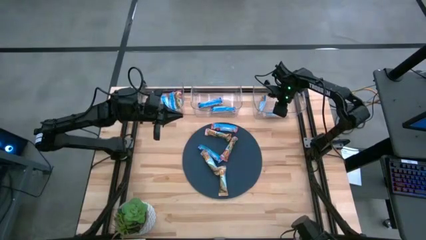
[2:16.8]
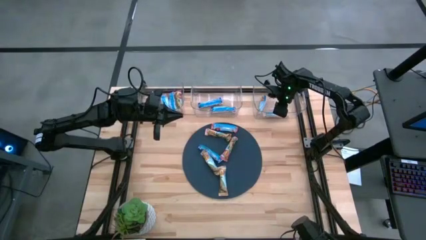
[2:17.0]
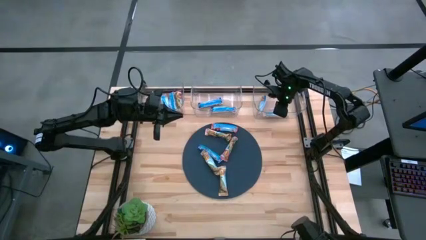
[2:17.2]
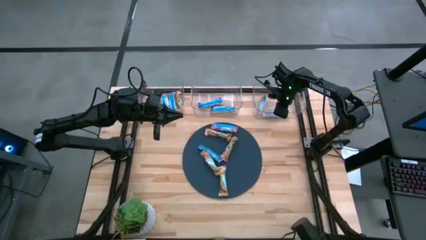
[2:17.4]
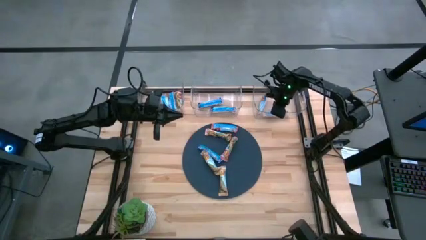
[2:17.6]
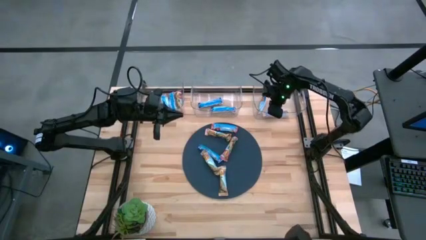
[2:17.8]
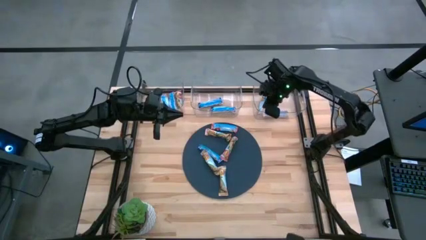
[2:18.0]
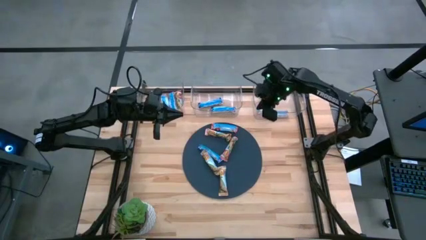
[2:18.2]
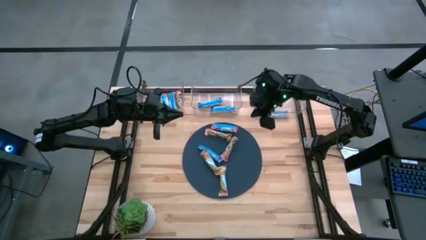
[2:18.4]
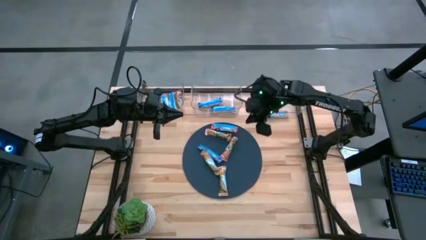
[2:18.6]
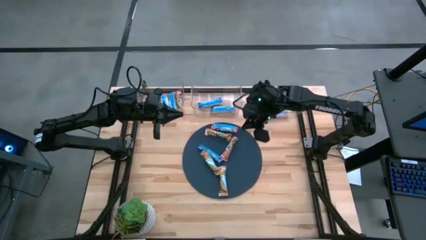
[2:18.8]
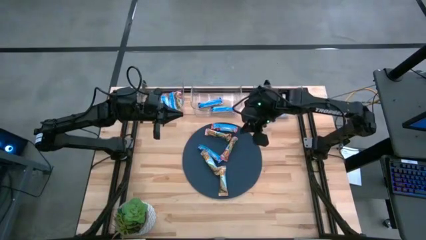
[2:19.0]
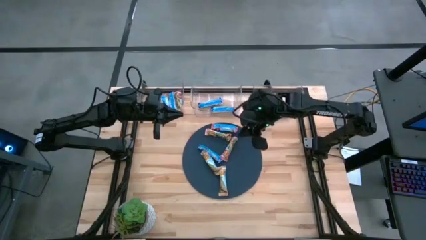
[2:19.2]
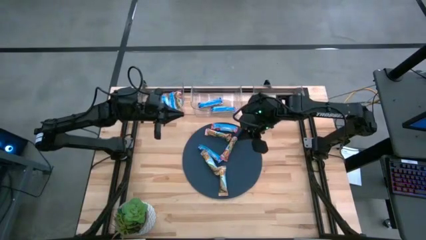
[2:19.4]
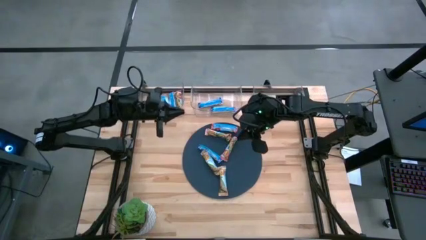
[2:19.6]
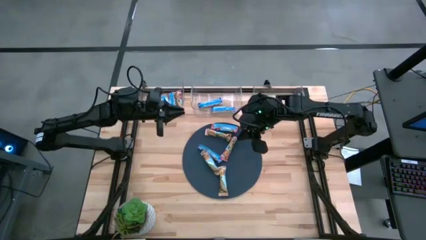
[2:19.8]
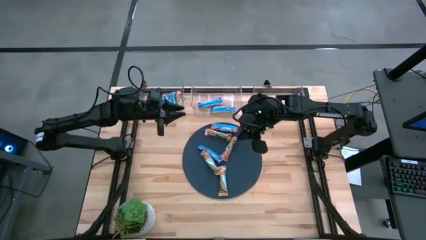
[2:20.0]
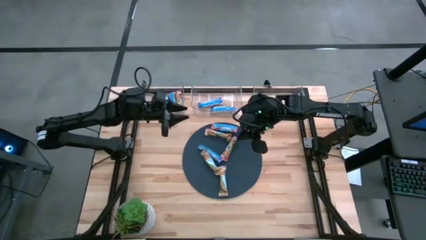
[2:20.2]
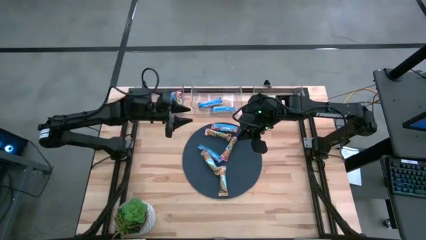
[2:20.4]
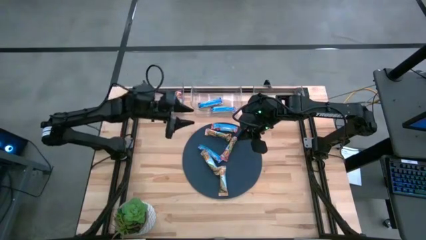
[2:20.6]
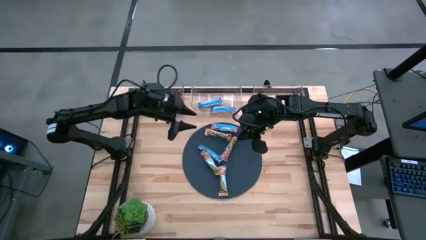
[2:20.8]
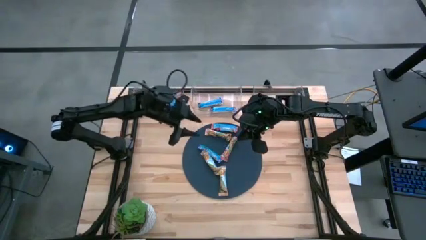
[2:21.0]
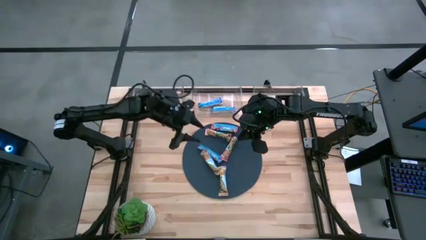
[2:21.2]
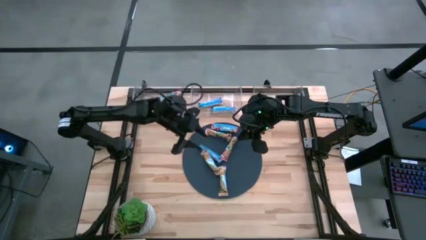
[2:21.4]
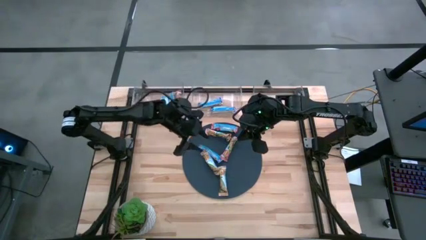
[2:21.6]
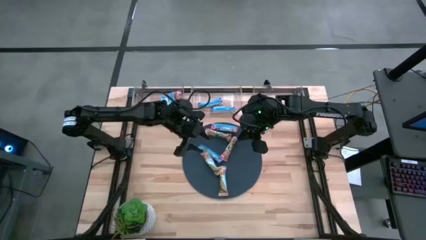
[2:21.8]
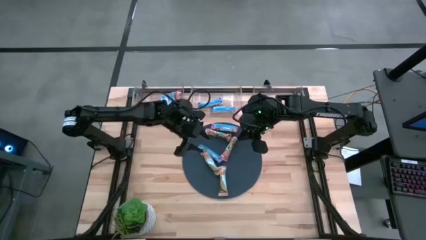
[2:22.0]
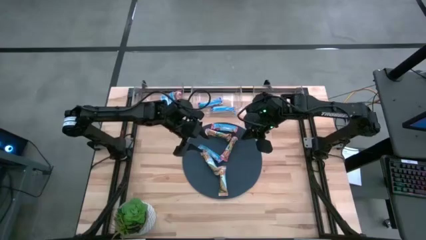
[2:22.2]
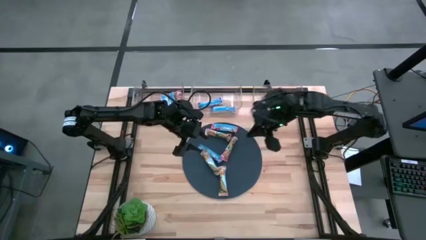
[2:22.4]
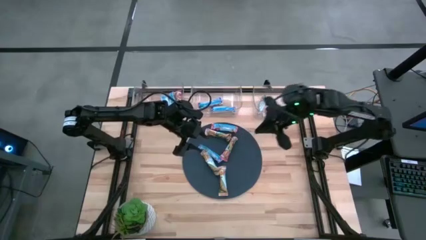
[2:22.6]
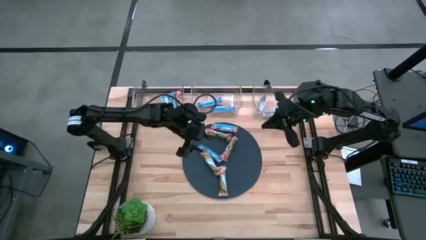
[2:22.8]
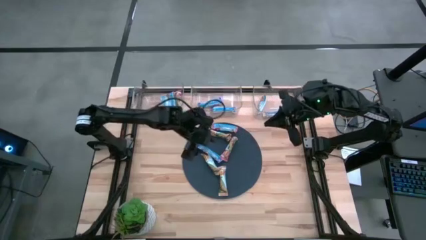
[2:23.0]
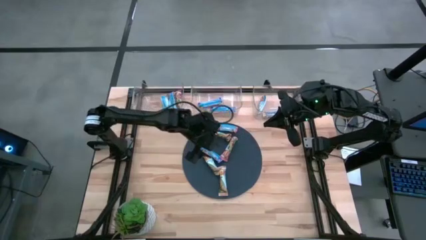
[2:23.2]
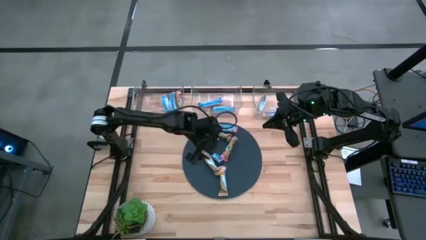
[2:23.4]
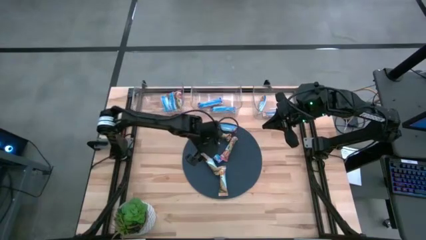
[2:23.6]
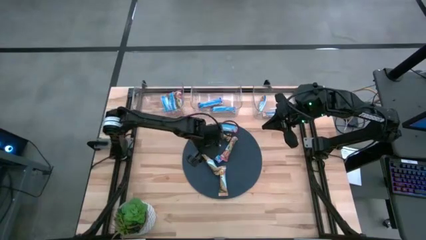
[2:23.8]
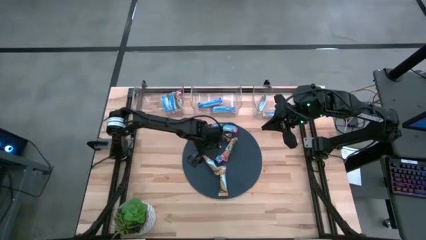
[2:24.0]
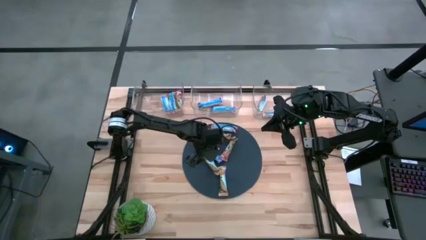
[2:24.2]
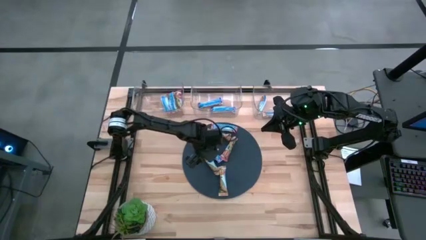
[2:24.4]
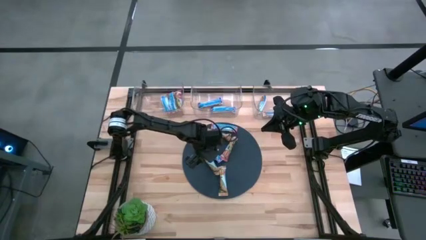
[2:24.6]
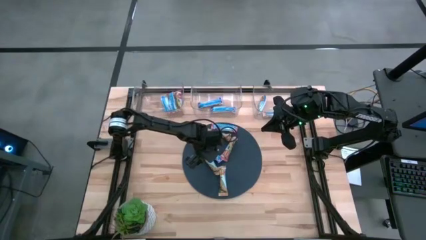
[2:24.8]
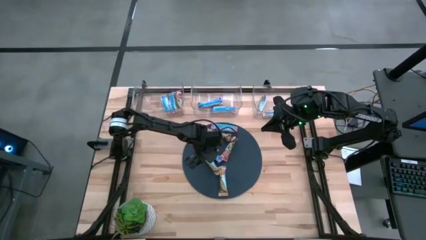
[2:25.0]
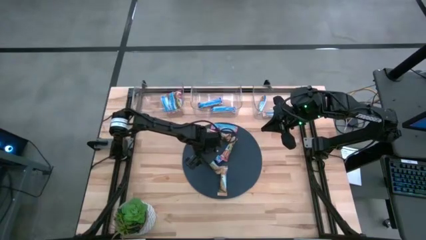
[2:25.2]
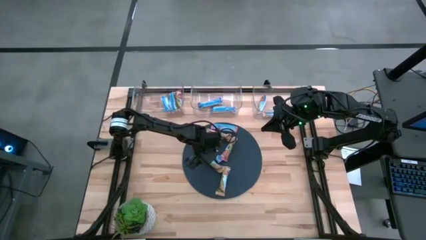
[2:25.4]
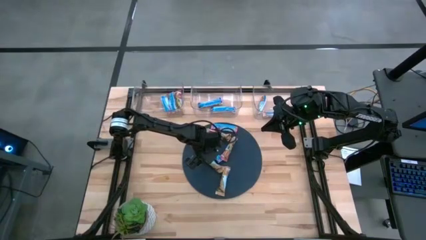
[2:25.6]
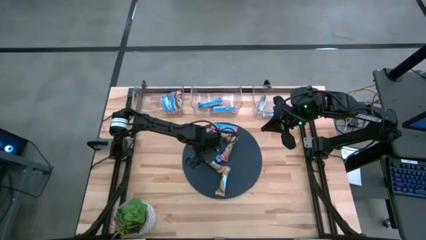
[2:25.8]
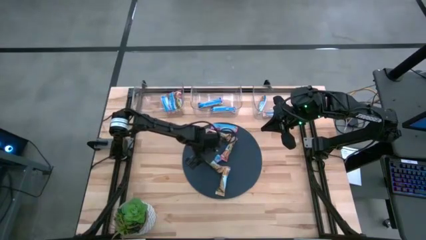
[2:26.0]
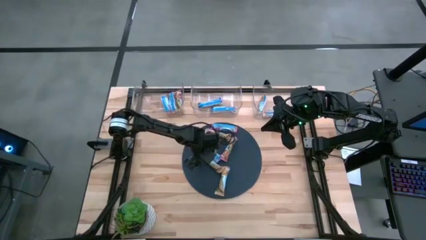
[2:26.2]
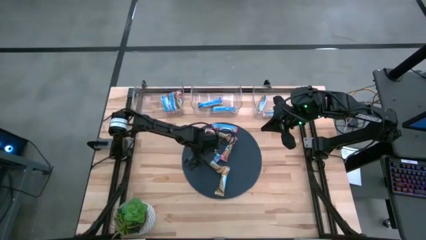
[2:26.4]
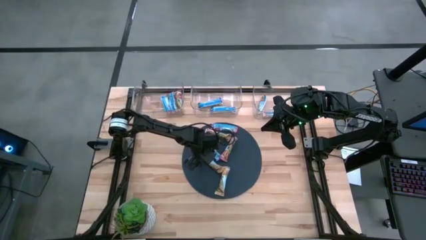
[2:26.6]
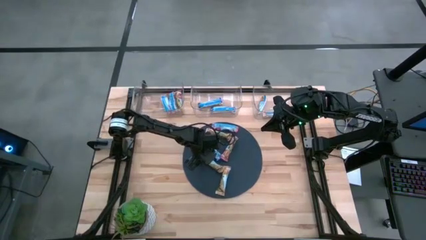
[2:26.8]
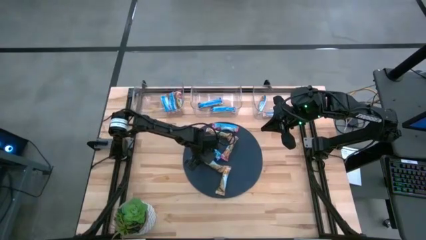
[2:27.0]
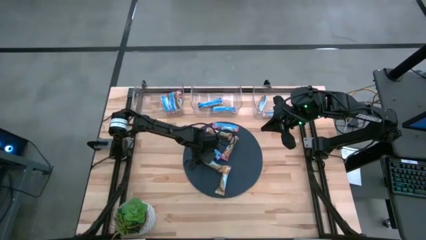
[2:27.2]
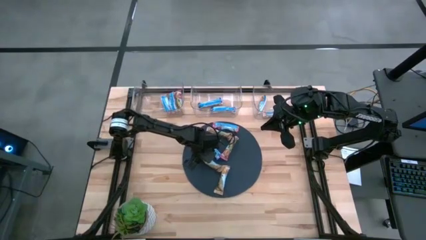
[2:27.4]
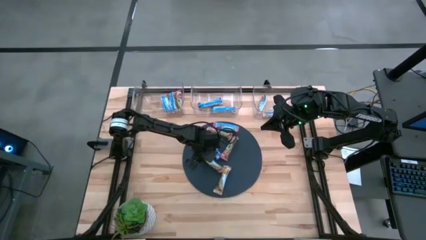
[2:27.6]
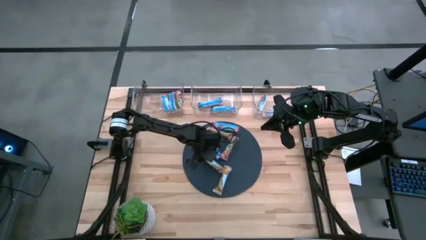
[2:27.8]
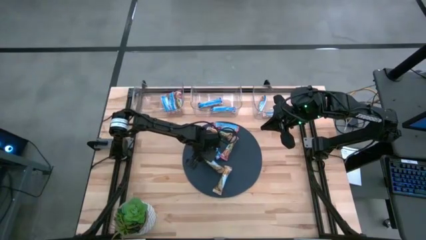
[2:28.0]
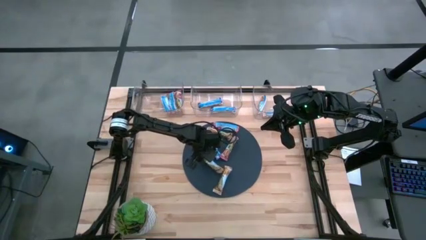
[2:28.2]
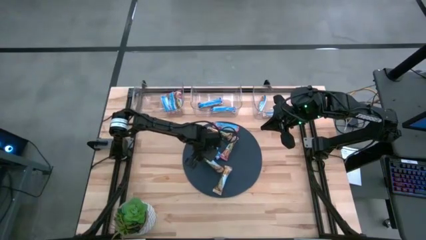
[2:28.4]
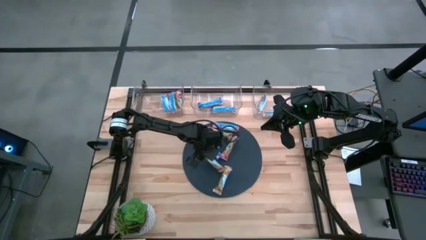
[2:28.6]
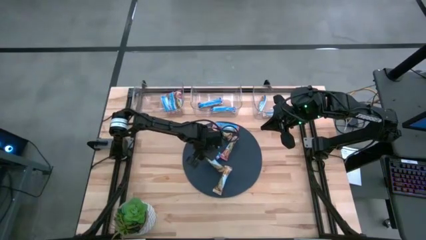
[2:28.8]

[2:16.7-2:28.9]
Task: Pick and place Granola Bars by type
Put the yellow granola bar into the right transparent bin

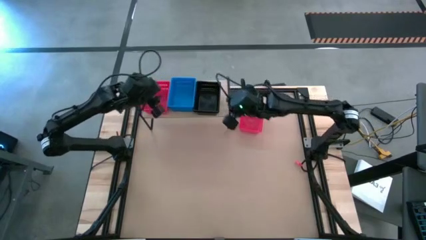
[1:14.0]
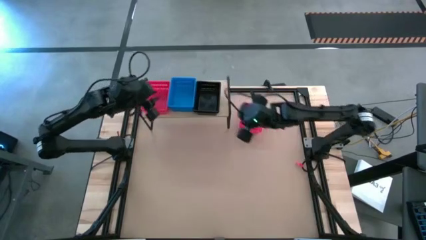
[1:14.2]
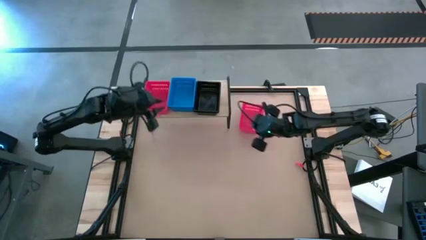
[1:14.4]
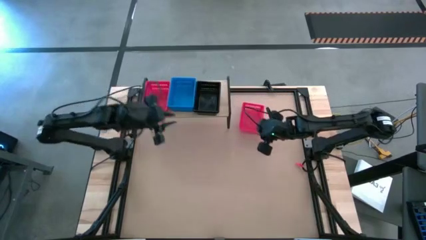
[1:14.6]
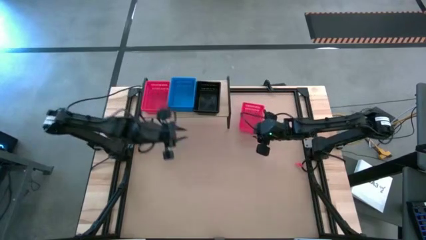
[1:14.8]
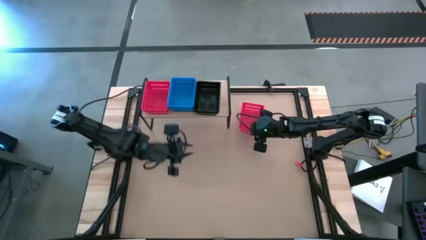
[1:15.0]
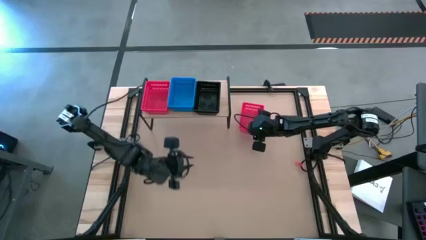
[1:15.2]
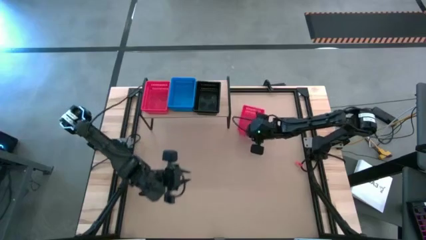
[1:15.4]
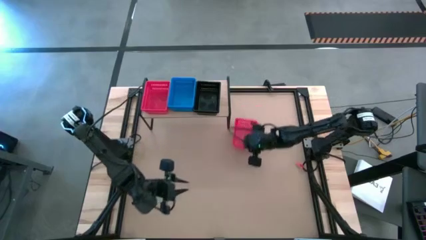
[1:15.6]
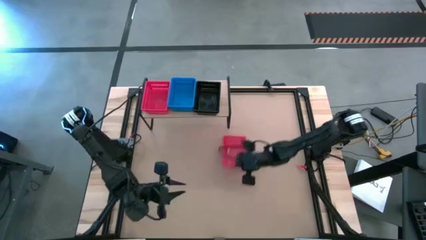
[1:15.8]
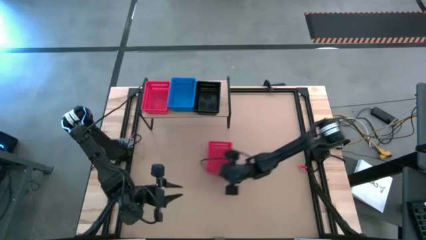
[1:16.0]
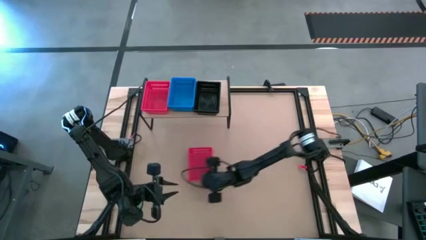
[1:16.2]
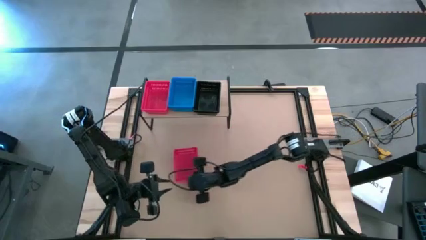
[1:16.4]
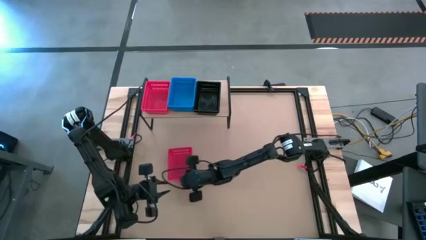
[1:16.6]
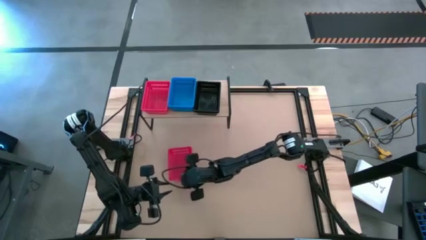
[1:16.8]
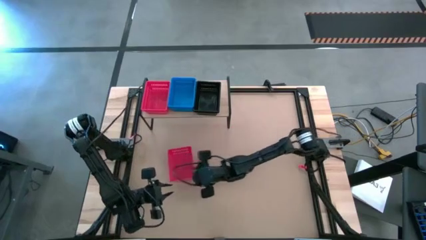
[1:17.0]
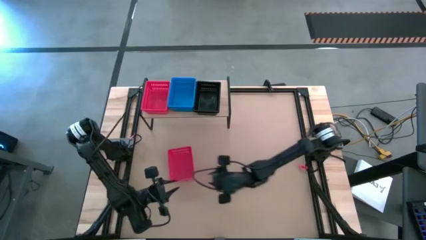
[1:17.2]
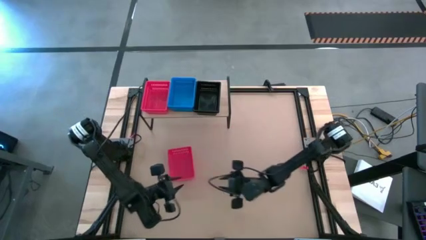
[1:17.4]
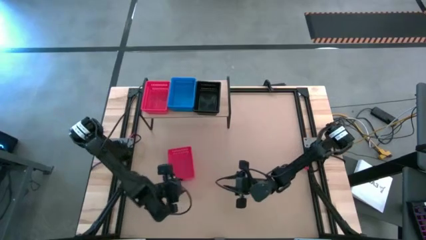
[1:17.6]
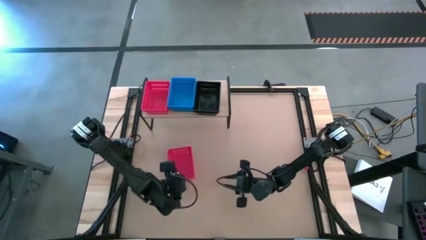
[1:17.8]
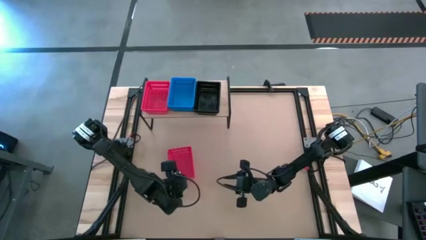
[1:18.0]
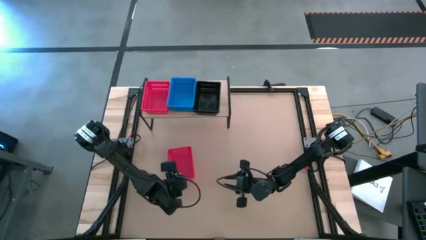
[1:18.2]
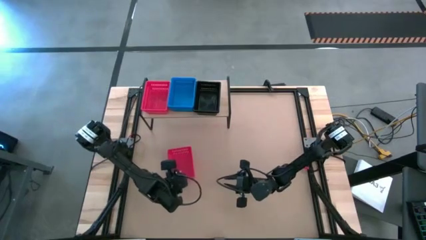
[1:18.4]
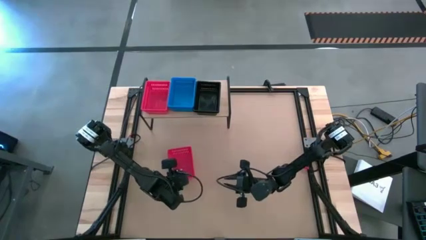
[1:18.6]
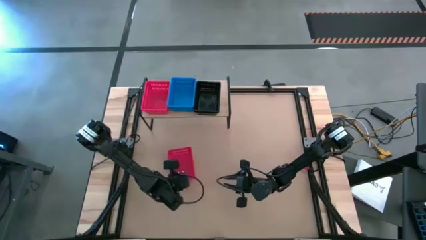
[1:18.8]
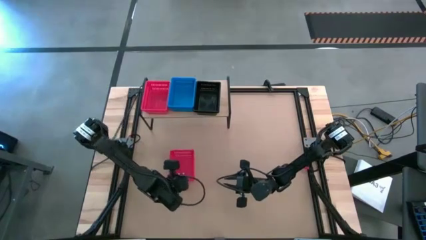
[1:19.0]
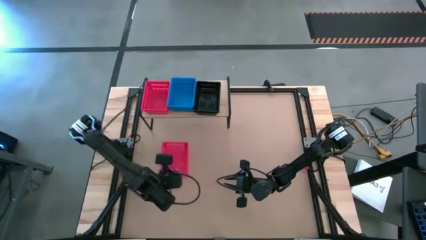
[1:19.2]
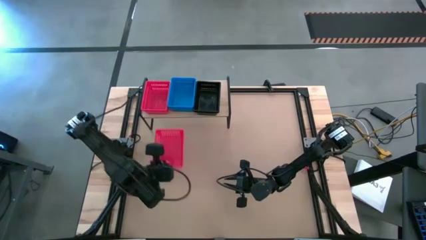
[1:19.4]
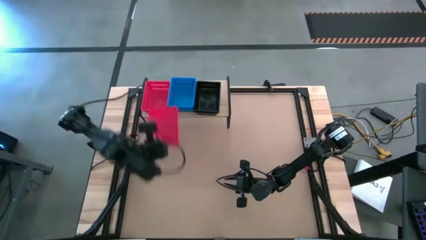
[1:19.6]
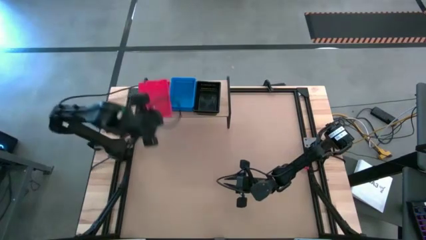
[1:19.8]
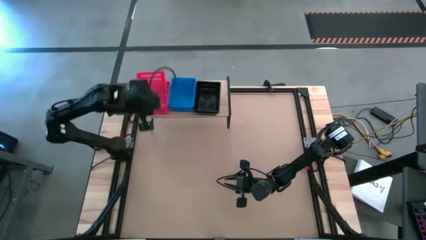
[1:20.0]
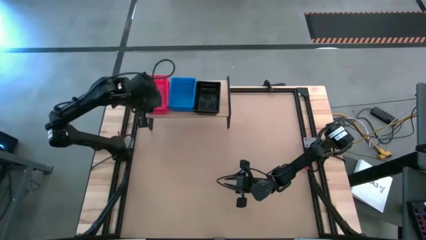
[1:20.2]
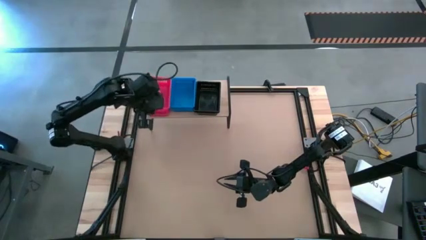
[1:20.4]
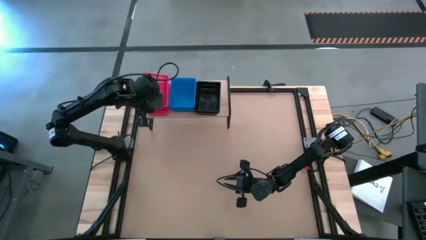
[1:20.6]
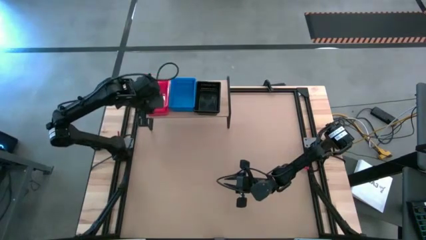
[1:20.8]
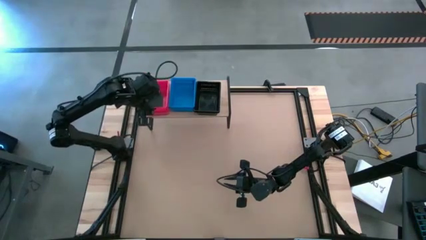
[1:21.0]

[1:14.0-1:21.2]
Task: Stack baskets on shelf by color
Stack the red bin on top of the red bin on the shelf
